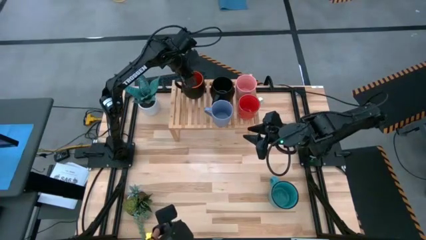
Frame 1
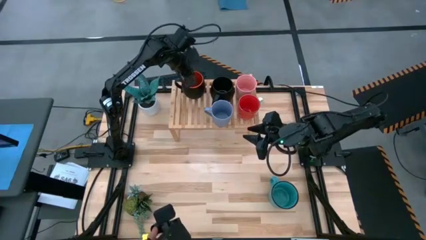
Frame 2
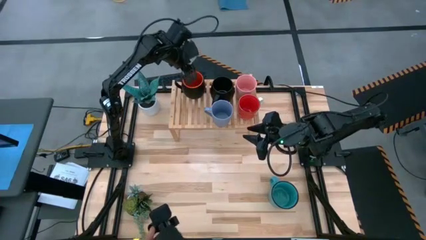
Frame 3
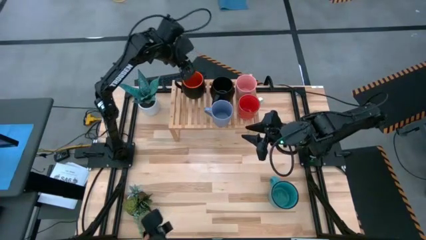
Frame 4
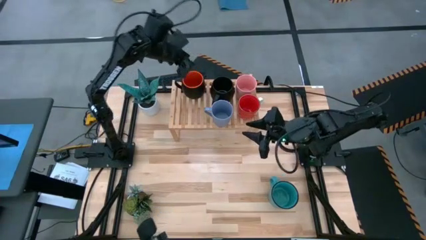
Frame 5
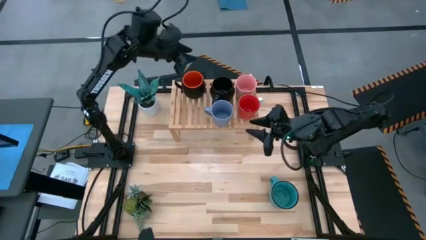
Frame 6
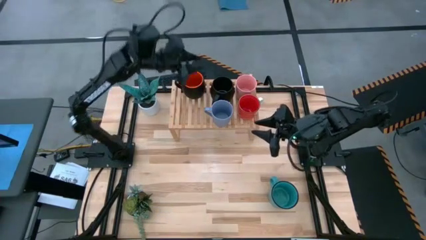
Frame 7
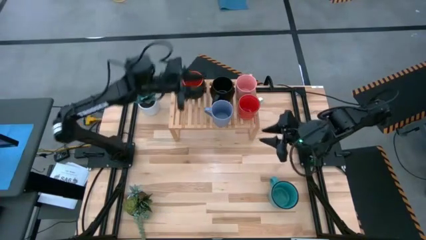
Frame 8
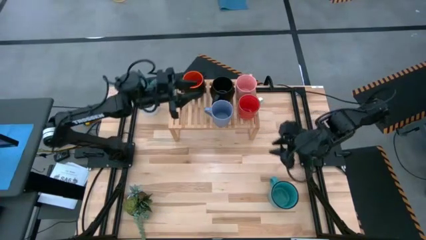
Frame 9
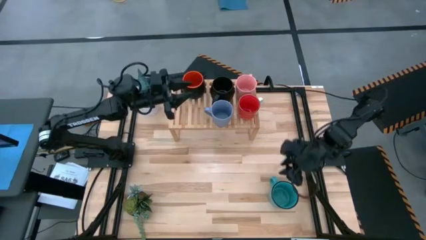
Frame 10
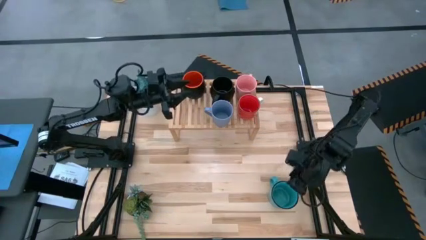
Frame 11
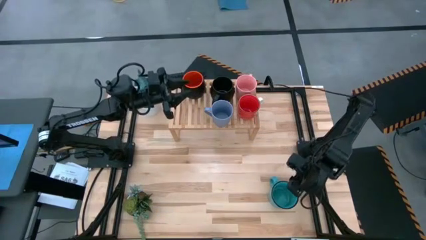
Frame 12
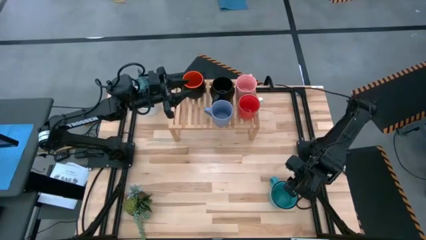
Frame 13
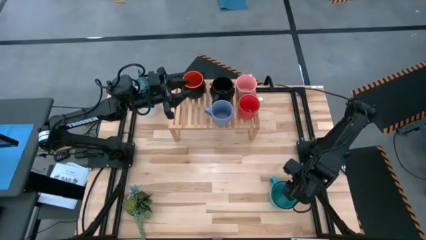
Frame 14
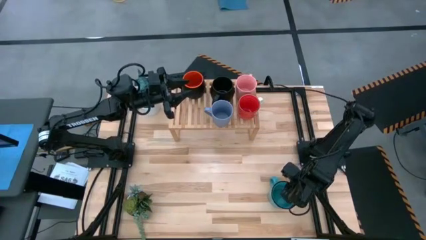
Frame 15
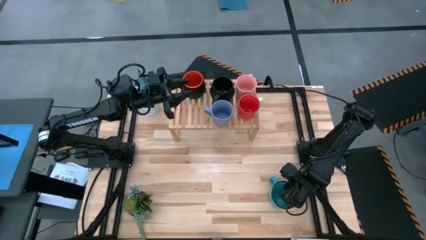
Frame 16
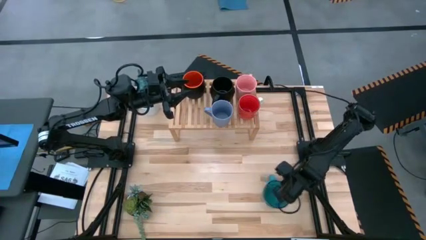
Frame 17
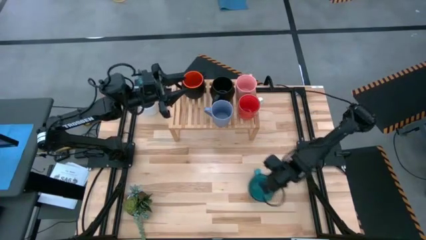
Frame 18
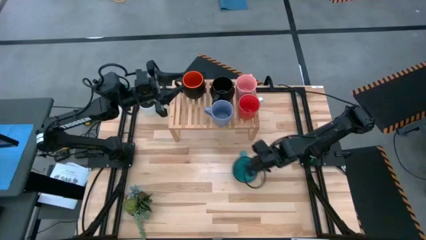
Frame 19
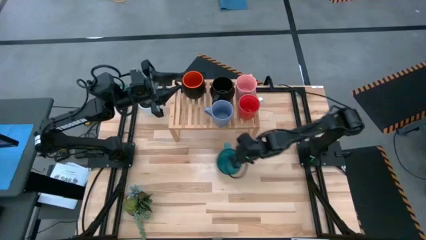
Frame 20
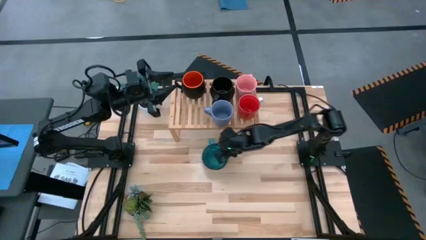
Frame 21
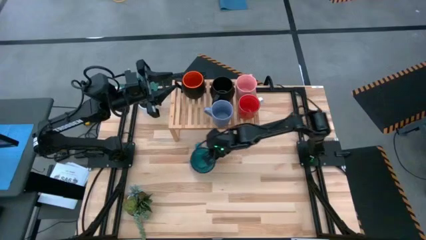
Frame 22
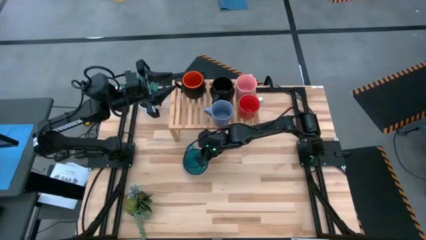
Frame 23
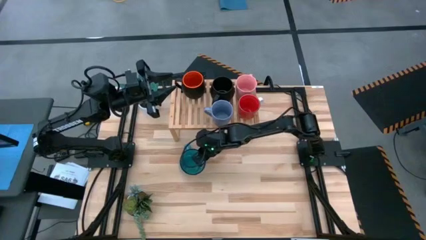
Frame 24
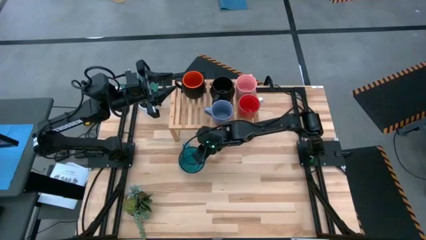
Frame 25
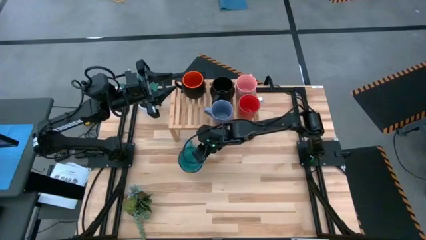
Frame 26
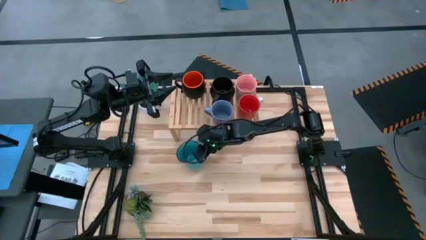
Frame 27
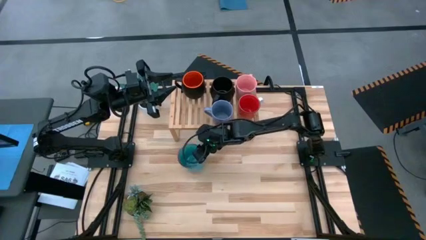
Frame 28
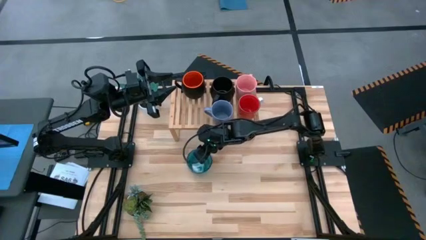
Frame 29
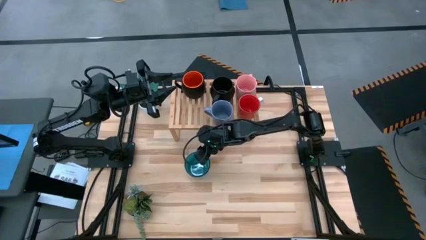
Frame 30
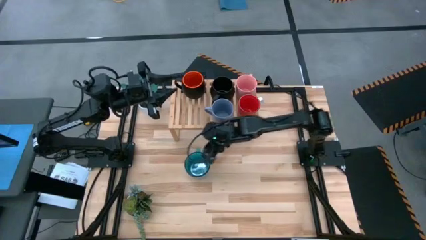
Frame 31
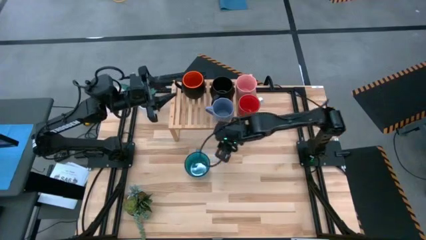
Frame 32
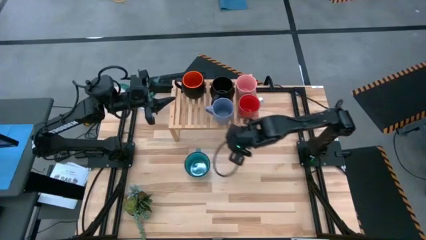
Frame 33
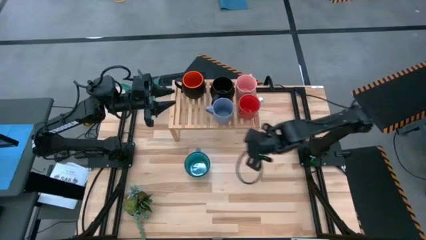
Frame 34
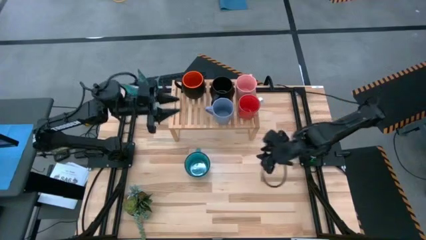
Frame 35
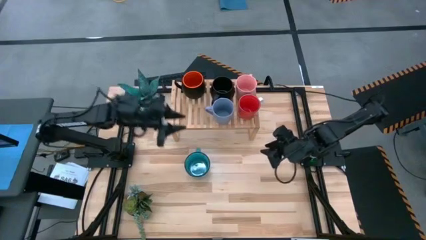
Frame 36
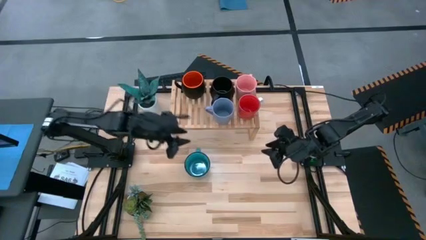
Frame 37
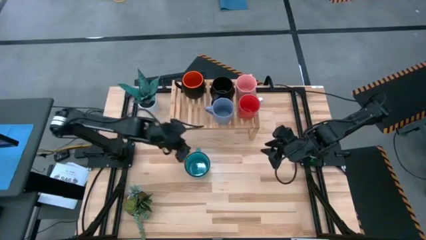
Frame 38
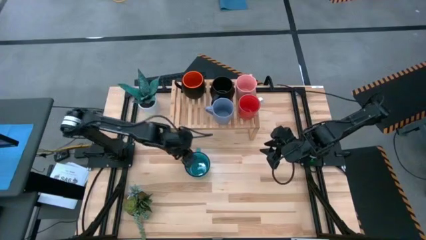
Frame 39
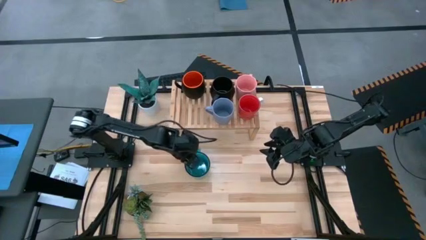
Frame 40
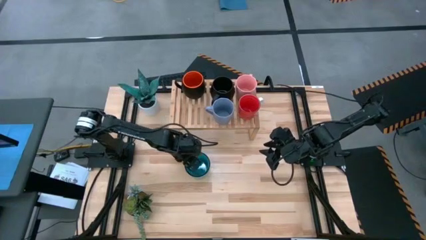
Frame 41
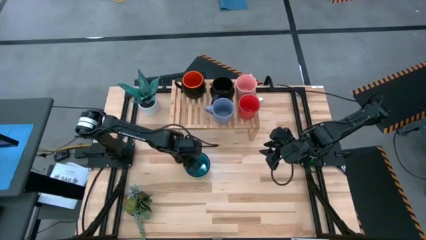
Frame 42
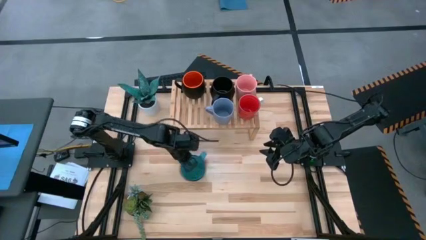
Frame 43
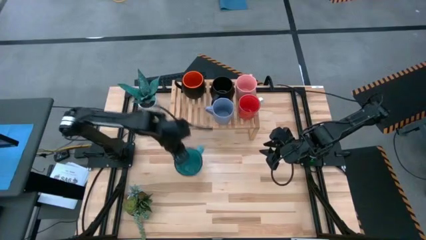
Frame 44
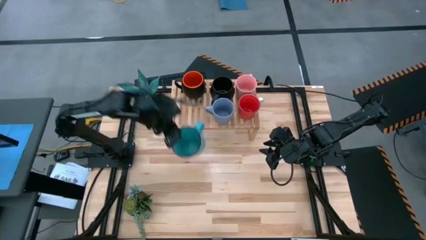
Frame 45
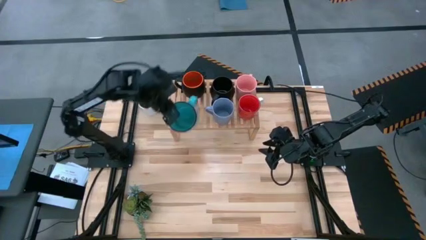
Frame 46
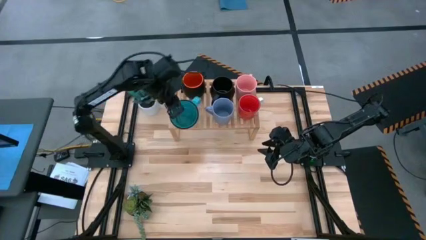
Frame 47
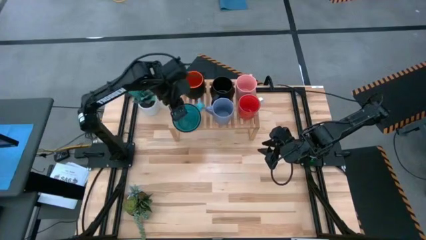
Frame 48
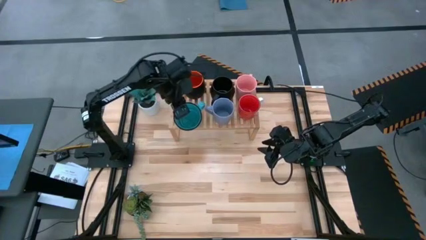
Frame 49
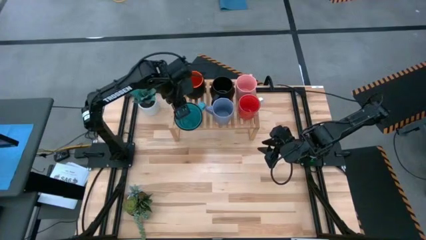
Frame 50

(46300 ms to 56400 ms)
Task: Place coffee mugs
Put the teal blue mug on the shelf

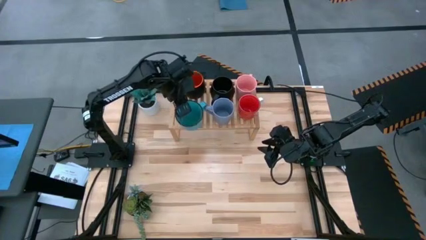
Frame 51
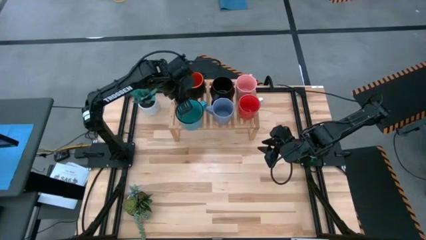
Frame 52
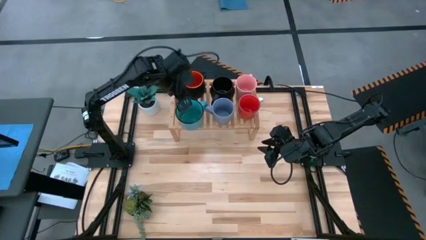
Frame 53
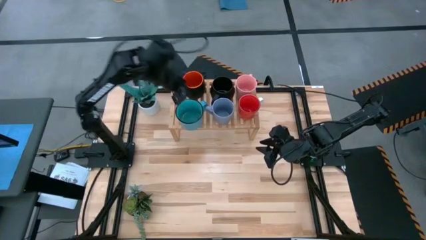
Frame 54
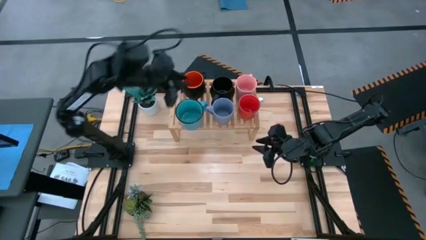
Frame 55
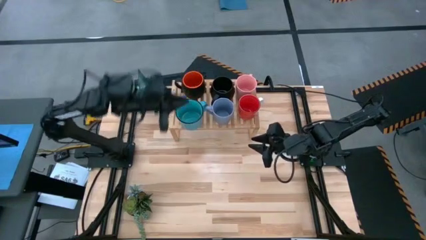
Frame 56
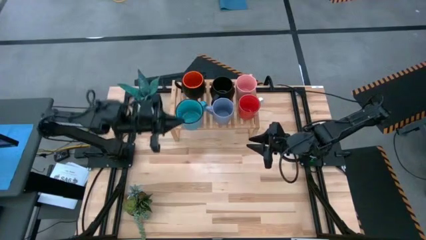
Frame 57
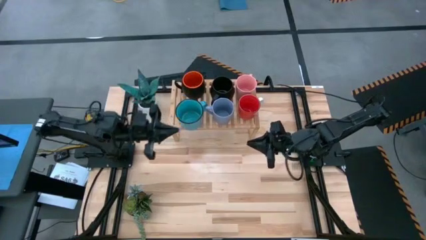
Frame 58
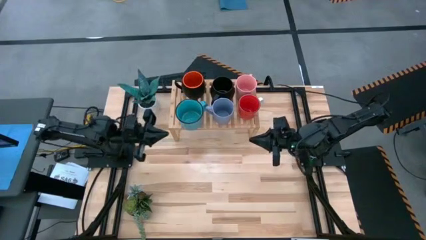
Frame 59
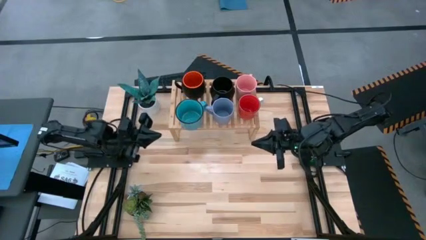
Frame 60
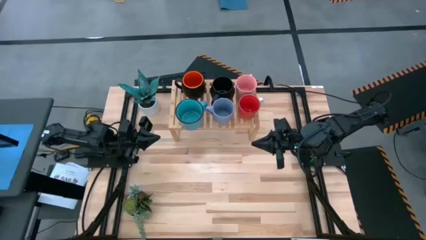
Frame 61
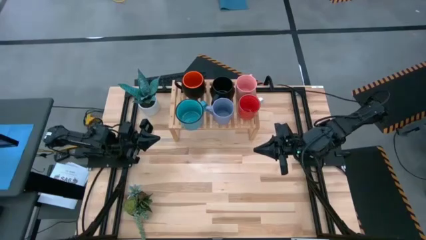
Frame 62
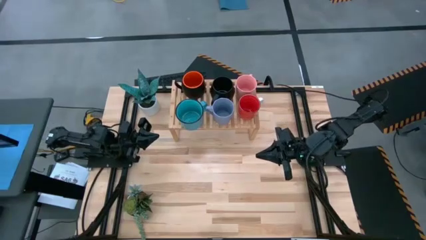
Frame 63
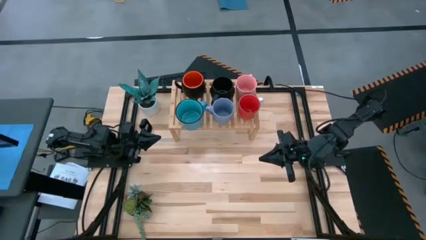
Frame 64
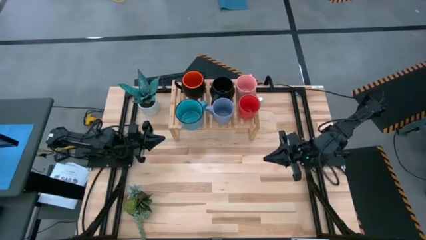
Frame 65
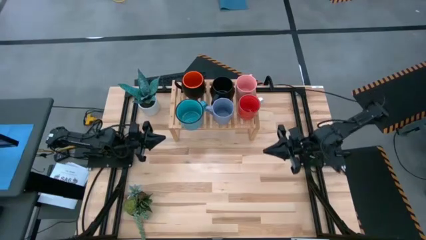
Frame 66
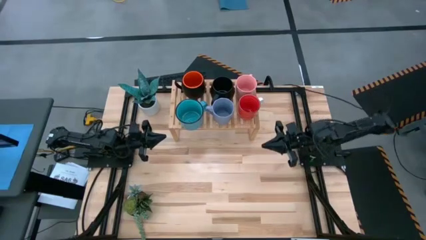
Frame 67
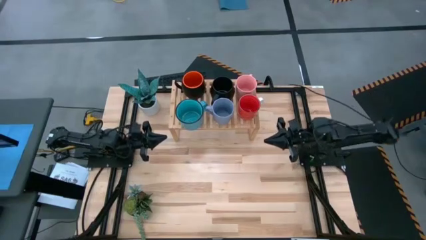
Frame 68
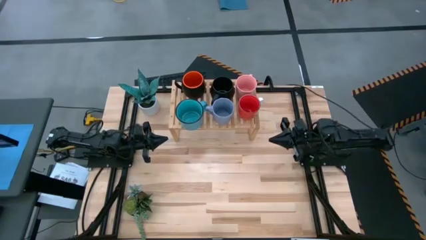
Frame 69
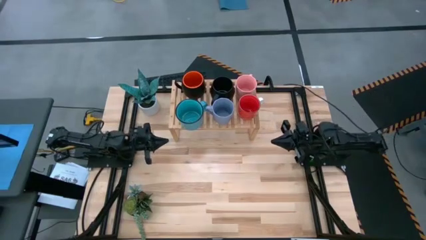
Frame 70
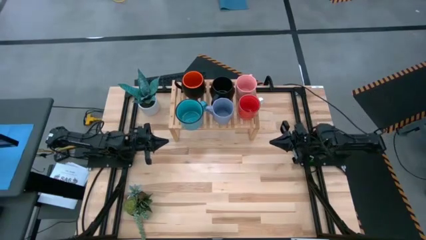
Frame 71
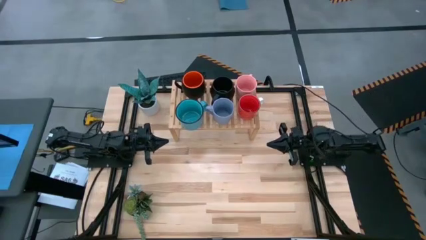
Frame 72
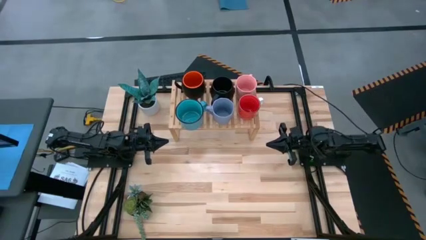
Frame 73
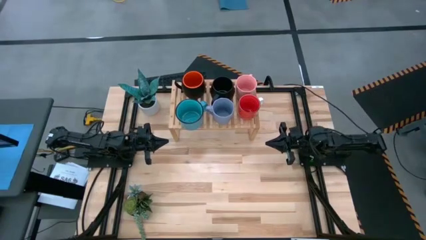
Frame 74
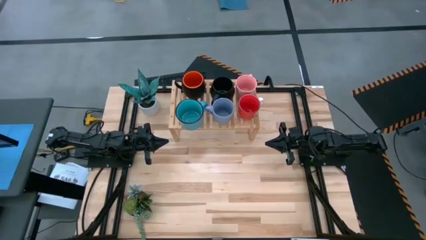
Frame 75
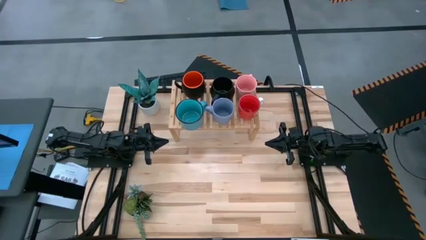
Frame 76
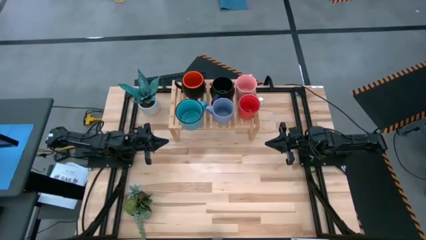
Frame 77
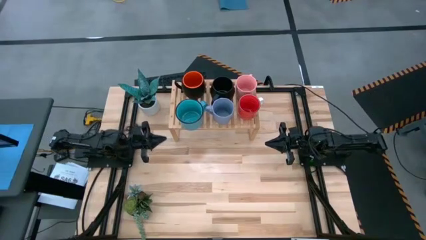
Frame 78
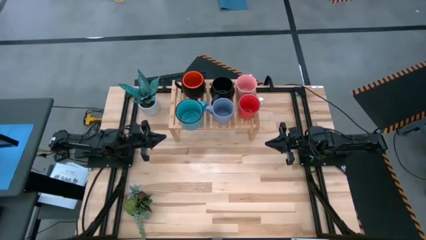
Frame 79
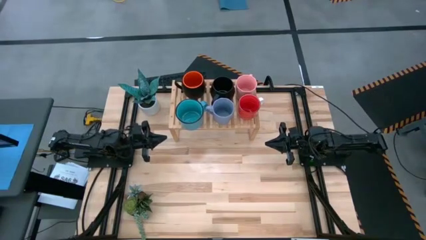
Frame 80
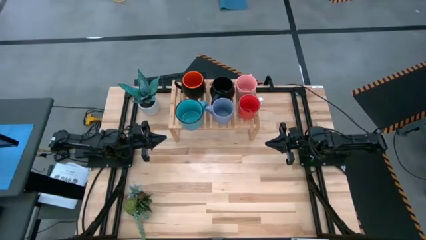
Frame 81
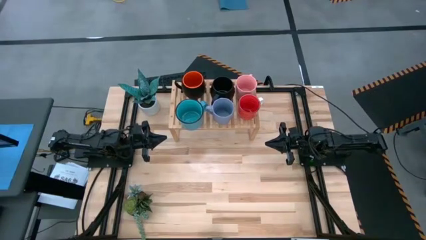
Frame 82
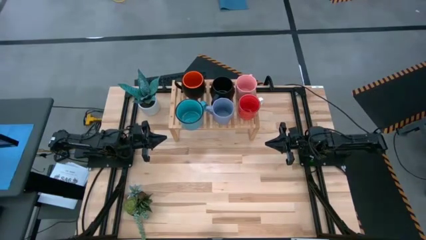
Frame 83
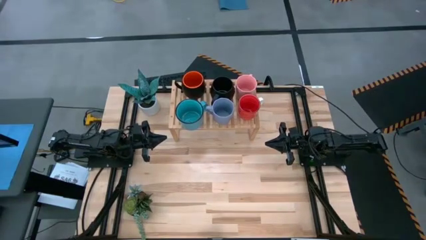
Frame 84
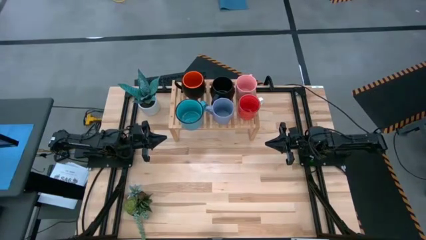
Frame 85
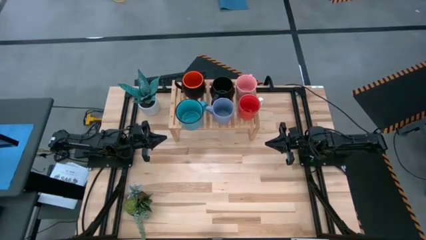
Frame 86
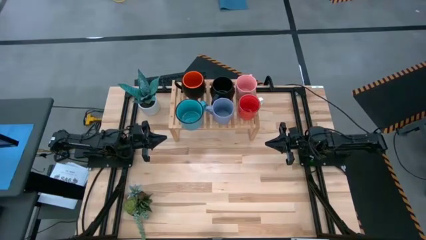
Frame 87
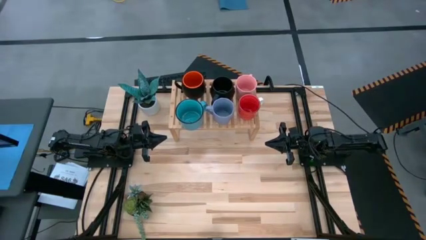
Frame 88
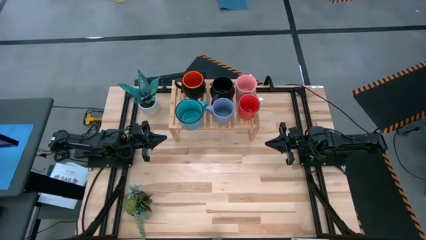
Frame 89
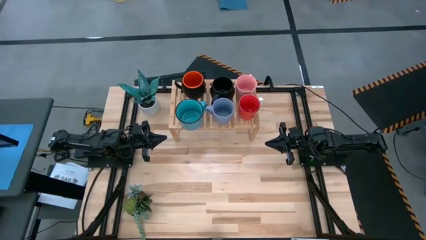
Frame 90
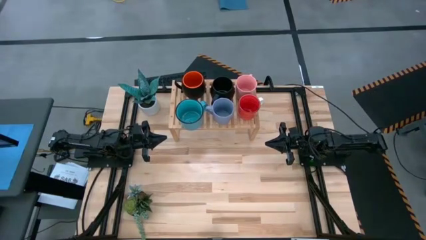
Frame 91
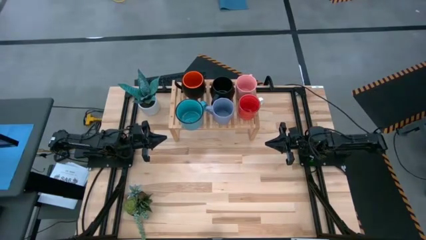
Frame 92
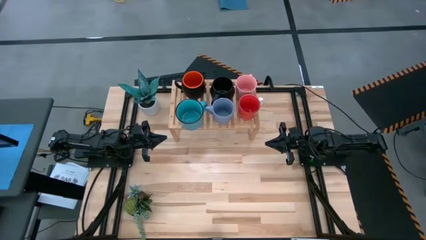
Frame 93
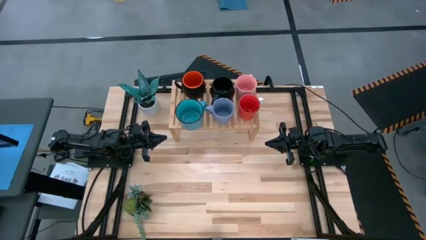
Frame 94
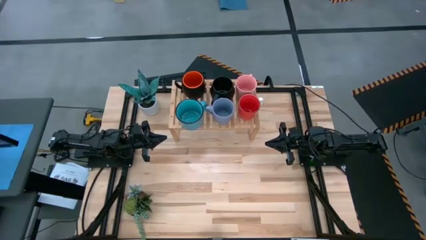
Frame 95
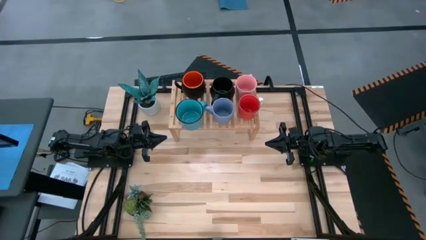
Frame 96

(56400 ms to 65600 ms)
Return to Home Position
